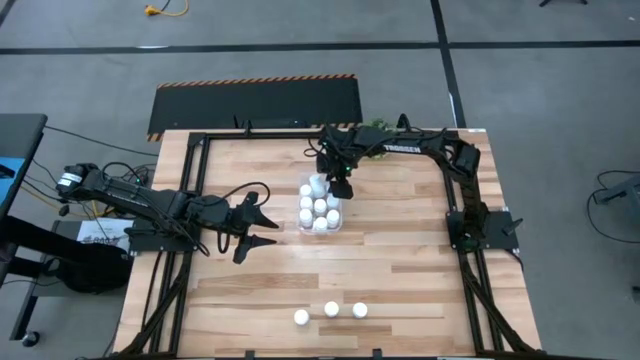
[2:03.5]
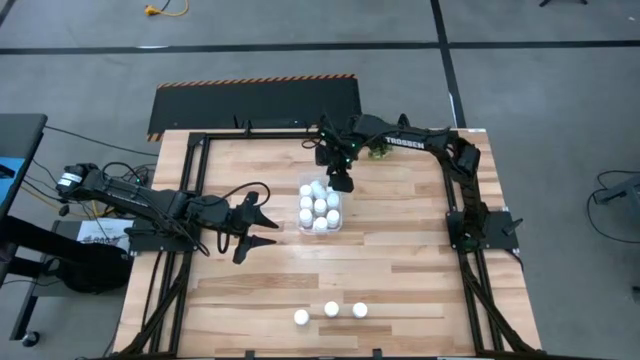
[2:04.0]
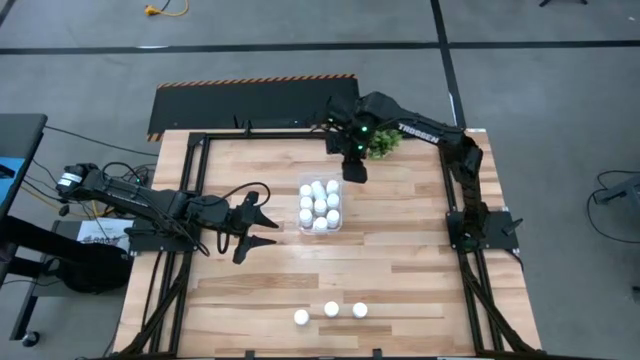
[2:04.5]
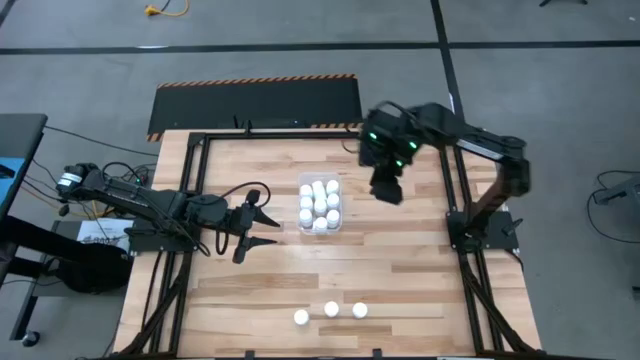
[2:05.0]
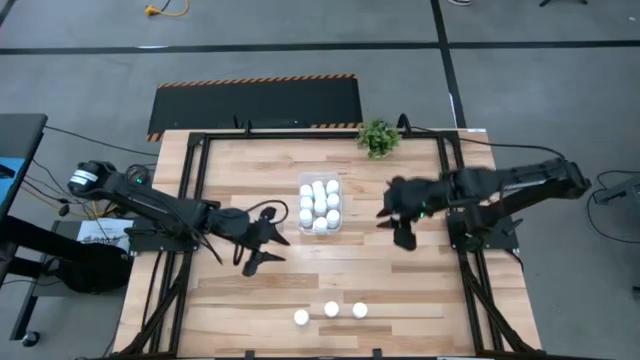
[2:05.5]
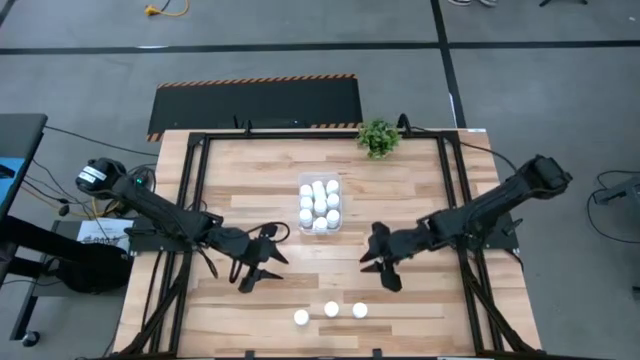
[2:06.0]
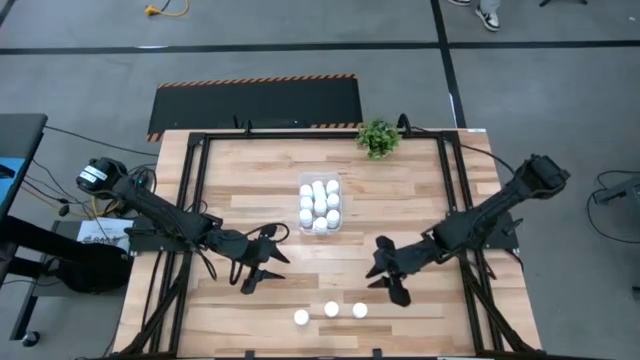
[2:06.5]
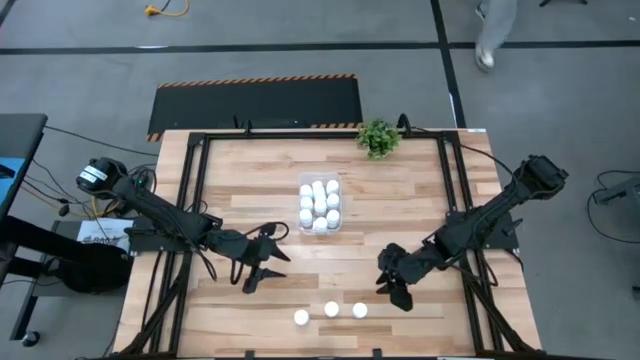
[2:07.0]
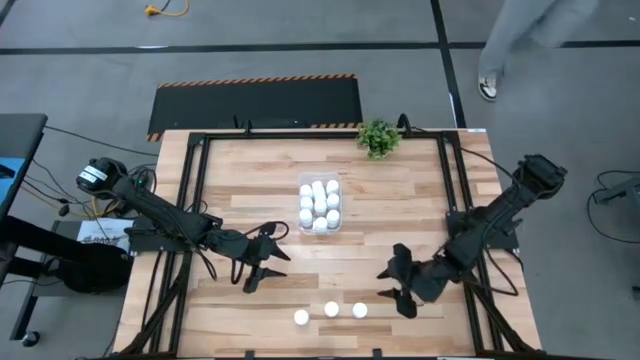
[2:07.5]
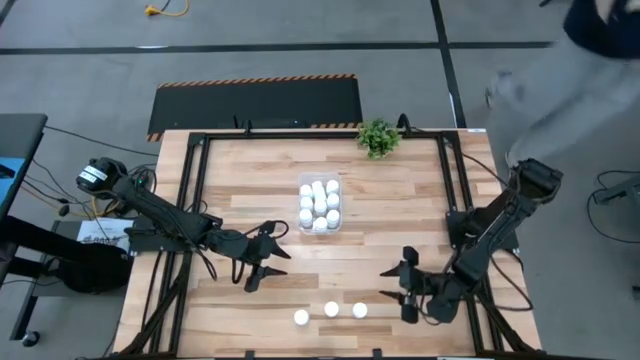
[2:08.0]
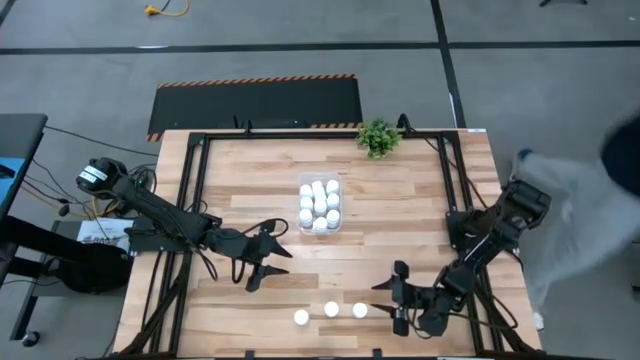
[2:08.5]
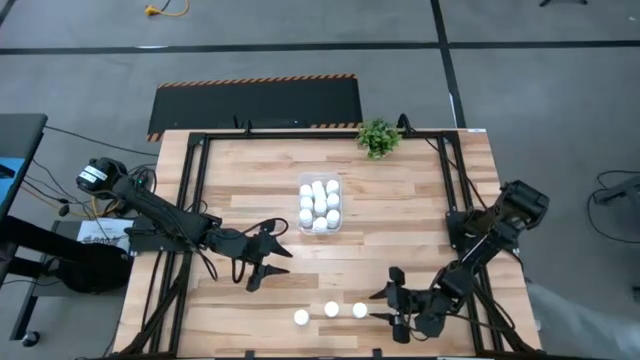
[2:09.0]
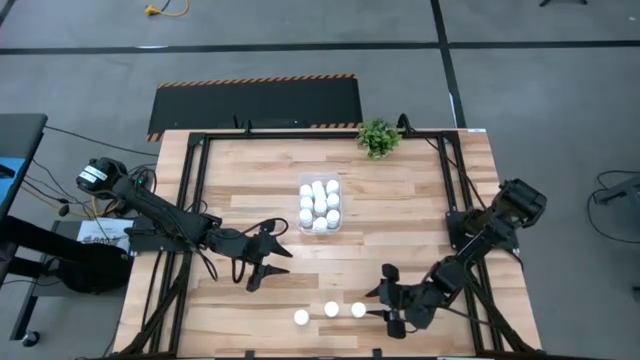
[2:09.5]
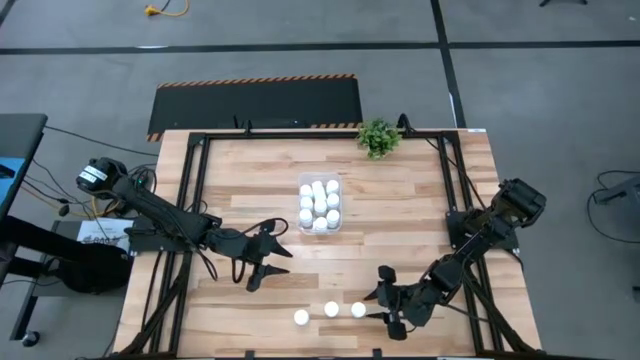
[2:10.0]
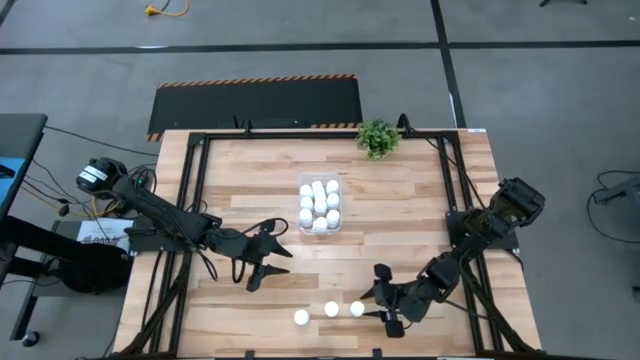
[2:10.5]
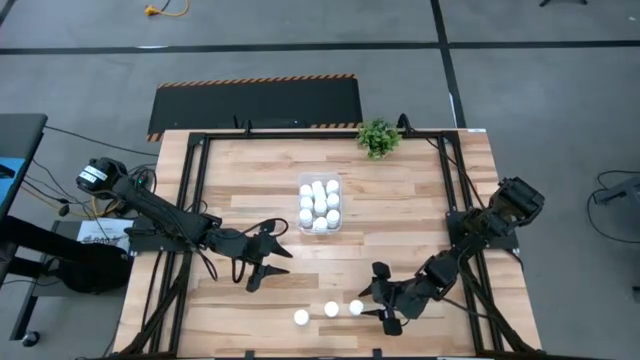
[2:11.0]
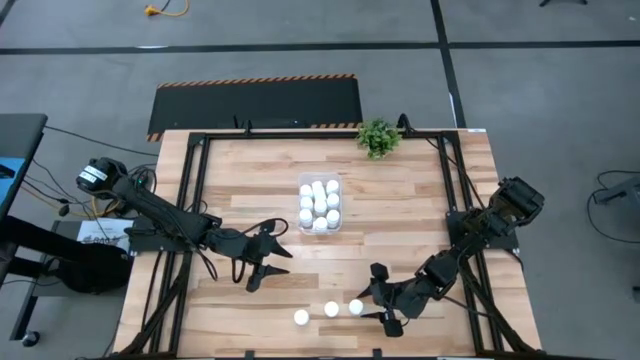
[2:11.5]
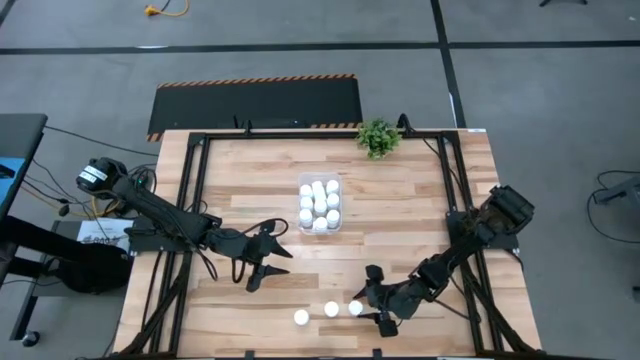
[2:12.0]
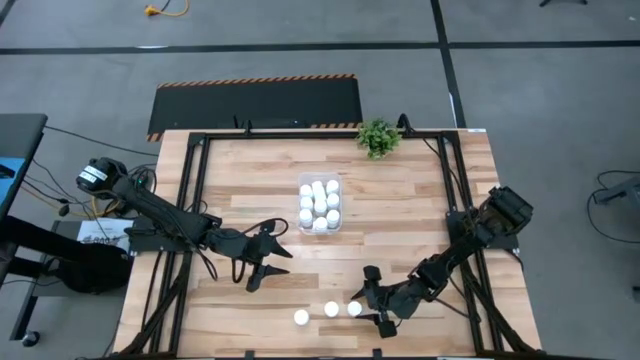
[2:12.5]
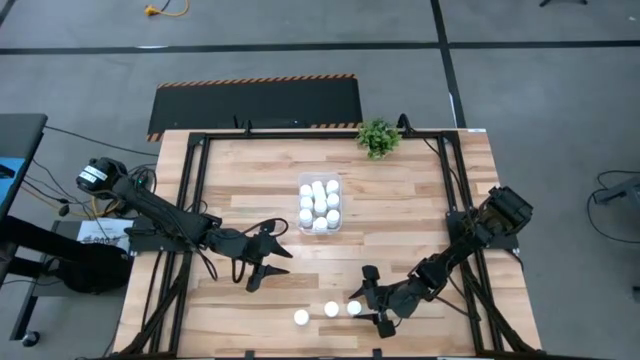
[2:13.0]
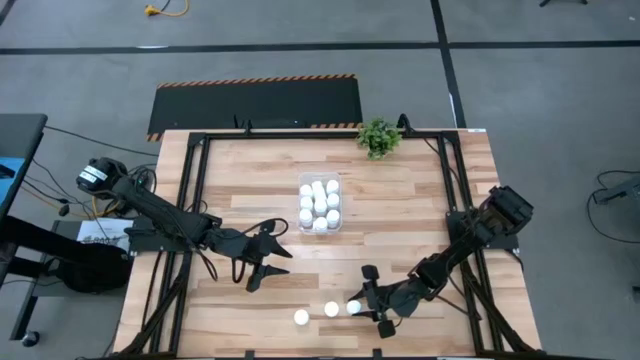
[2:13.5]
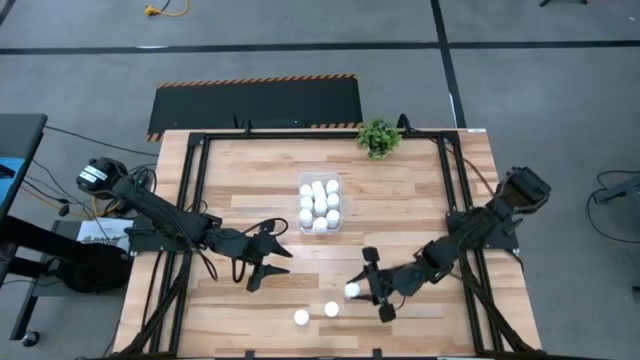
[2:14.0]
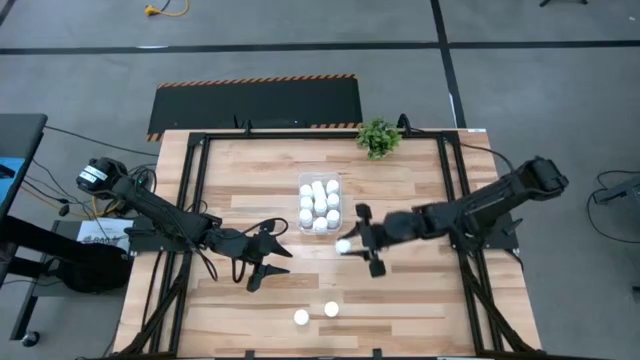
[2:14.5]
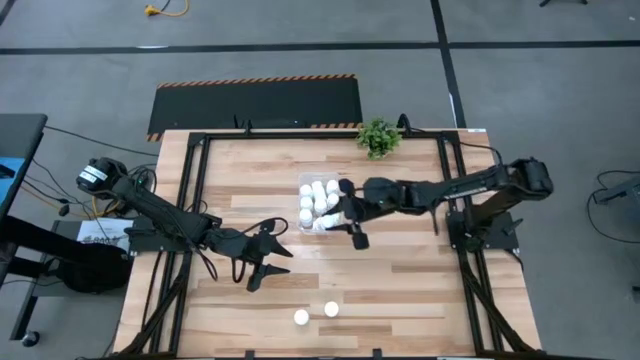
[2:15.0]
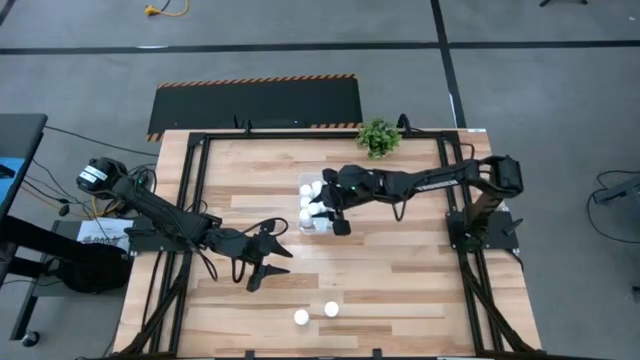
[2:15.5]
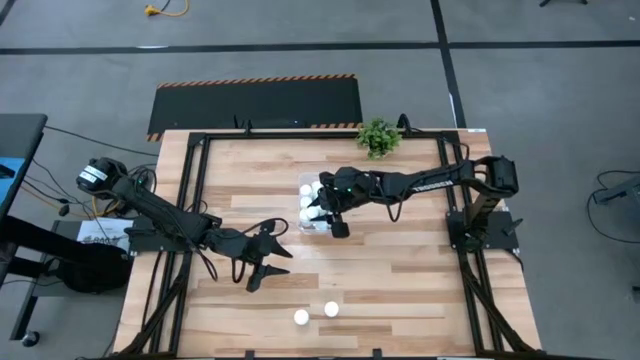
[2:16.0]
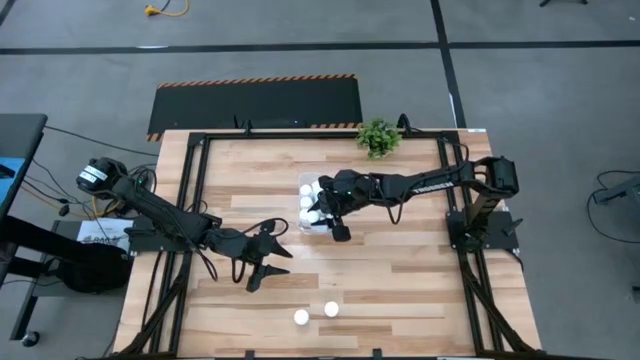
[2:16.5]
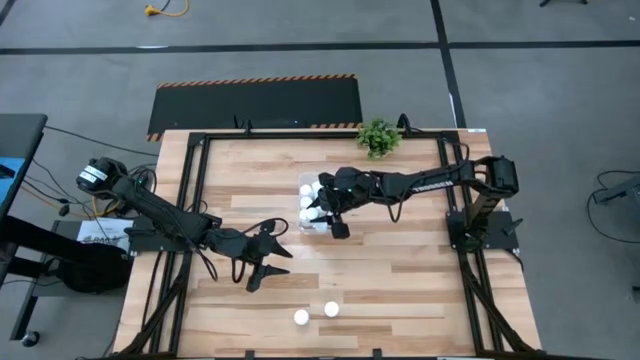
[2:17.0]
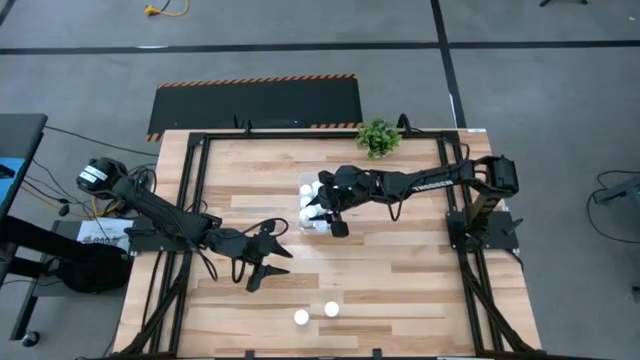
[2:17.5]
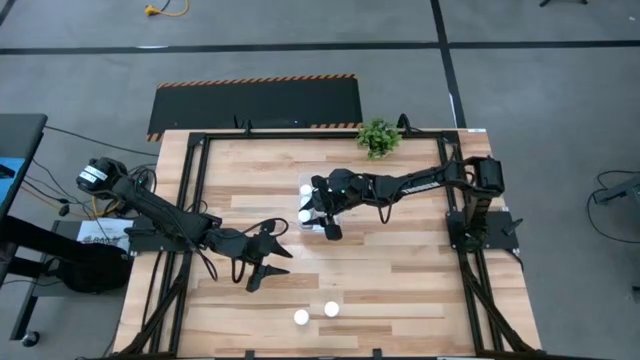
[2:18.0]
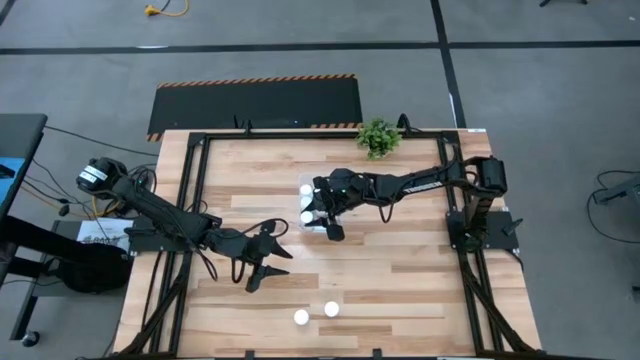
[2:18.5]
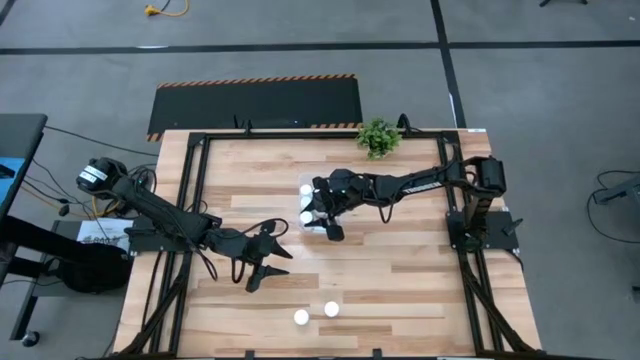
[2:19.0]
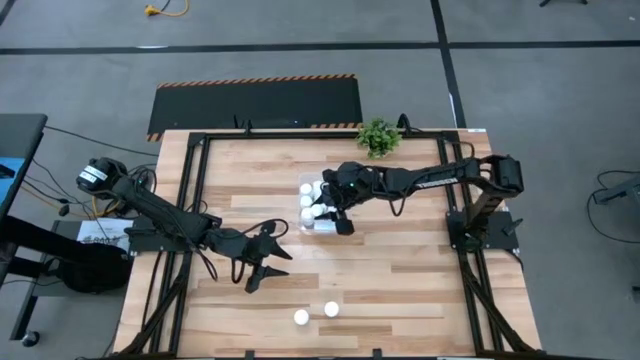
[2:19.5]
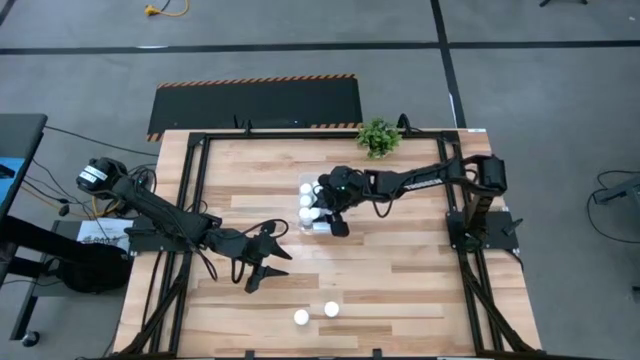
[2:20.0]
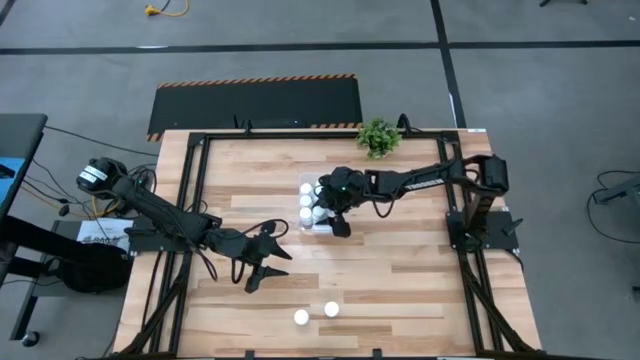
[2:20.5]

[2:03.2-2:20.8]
Task: Pick and place pill bottles into a basket
Put the pill bottles into the container

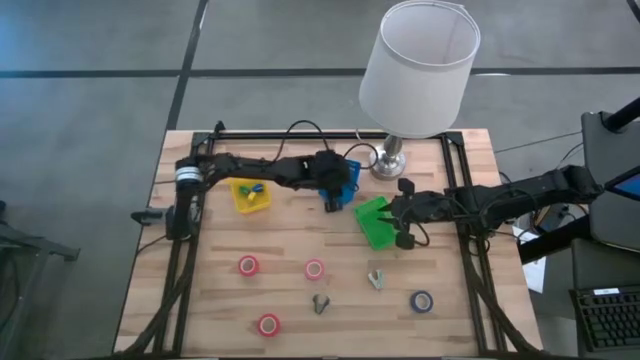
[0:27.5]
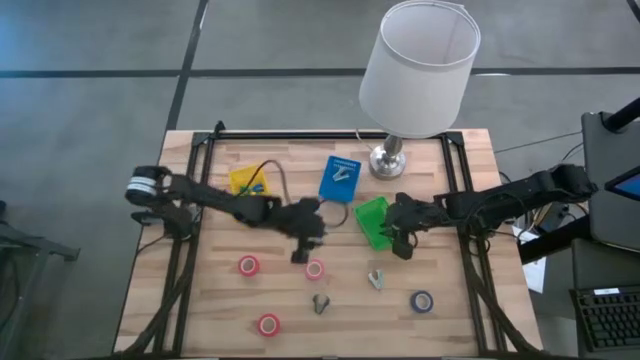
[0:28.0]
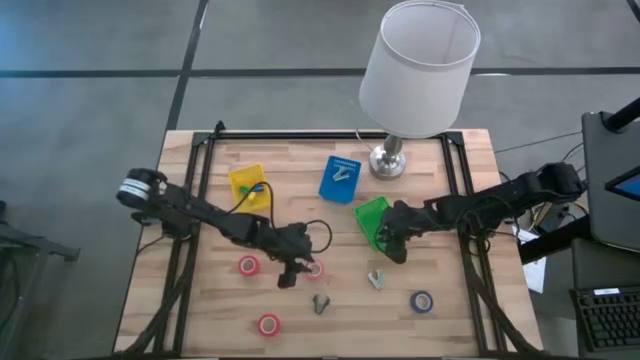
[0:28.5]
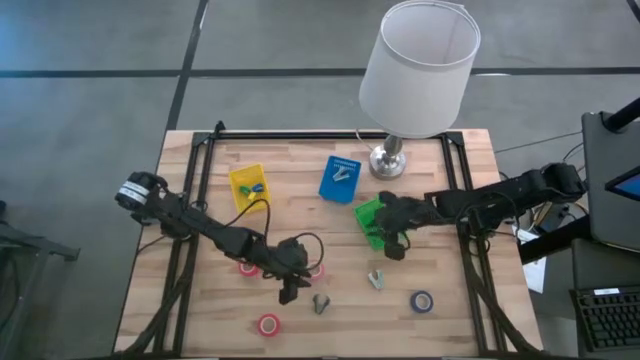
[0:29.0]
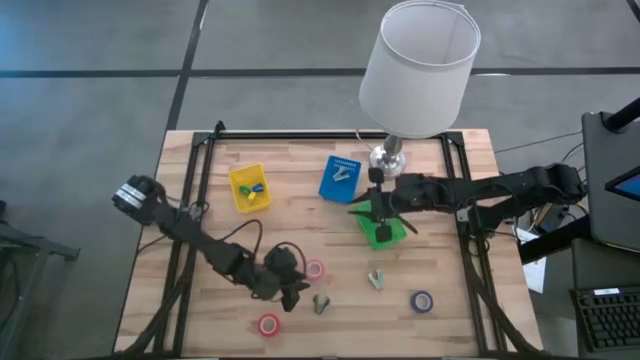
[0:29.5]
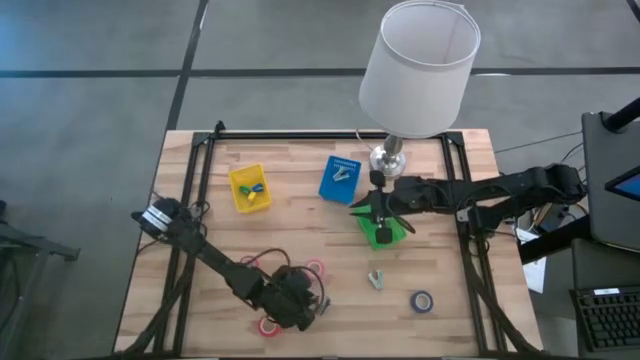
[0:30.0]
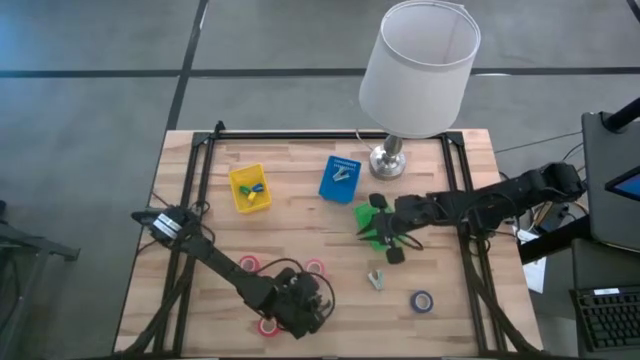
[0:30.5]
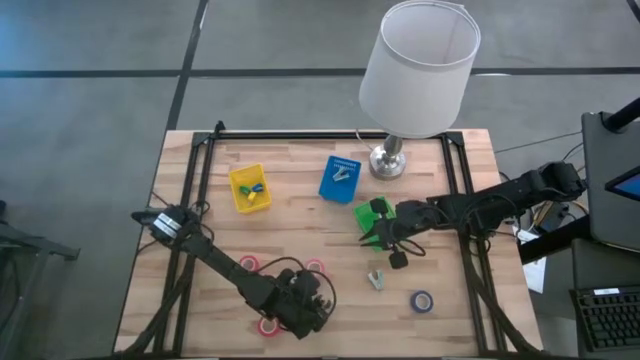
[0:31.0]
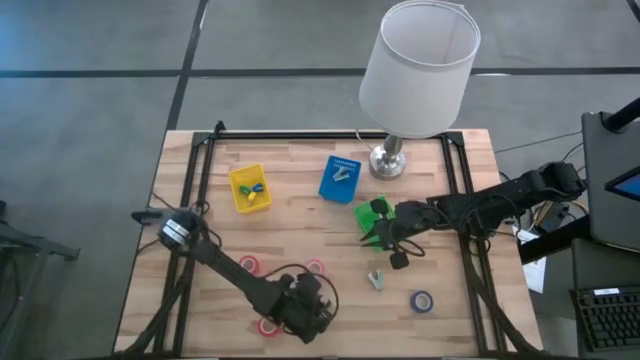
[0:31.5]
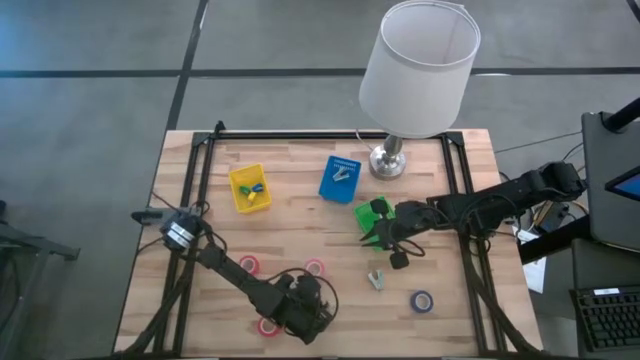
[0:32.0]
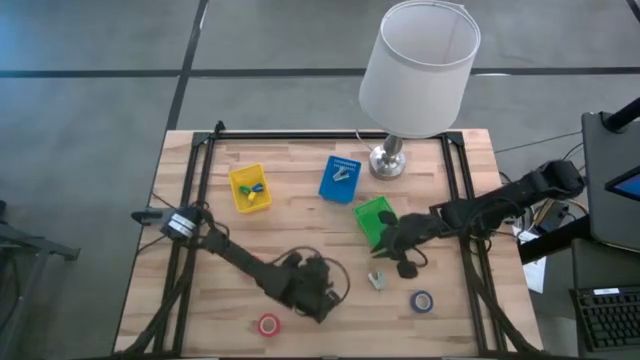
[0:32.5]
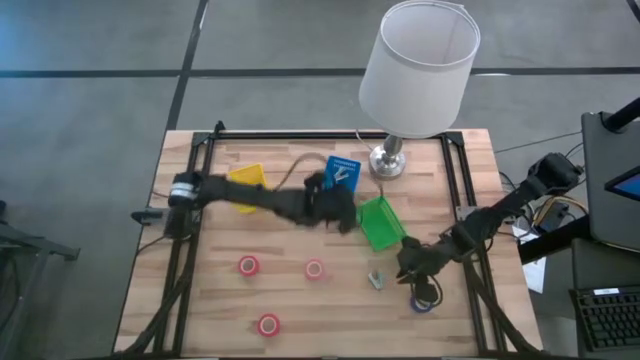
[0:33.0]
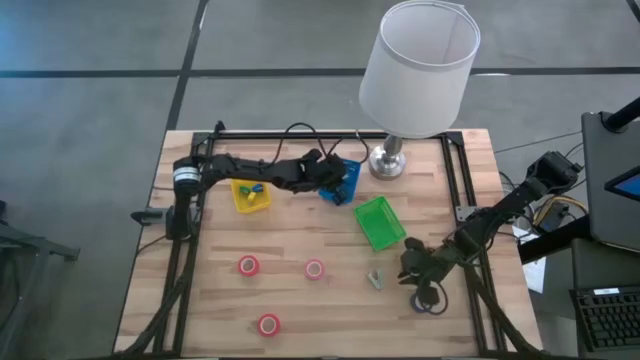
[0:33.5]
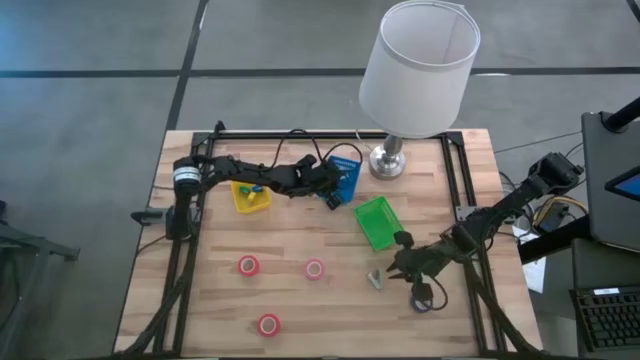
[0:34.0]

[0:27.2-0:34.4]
Task: Pick and place Stapler, Stapler remover, tape
Put the black staple remover into the blue basket
